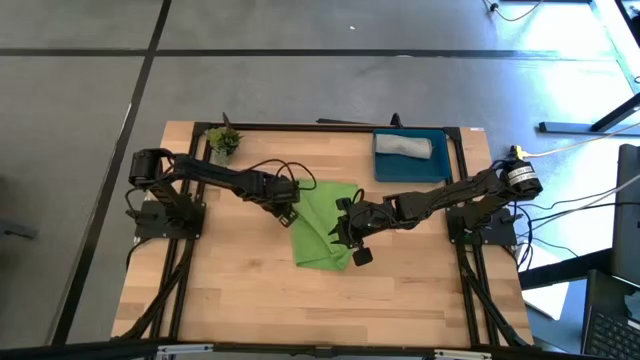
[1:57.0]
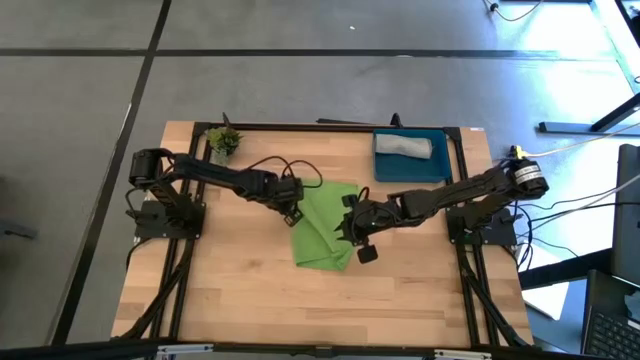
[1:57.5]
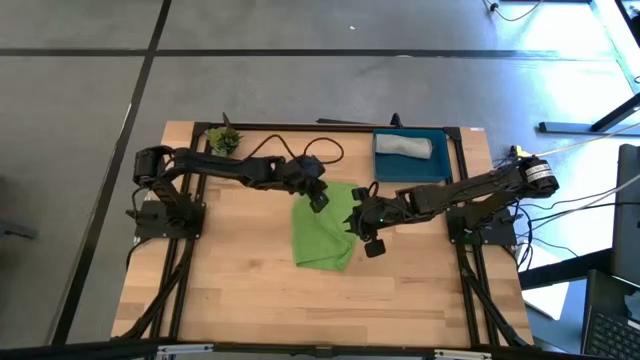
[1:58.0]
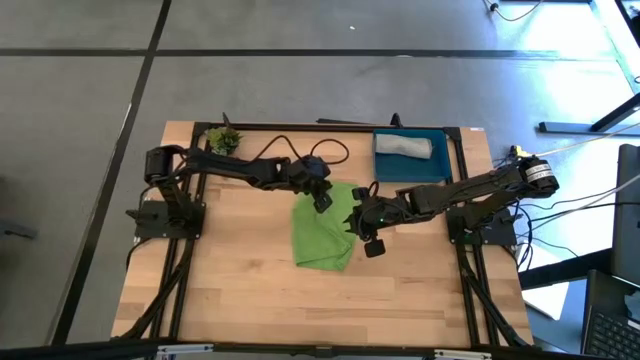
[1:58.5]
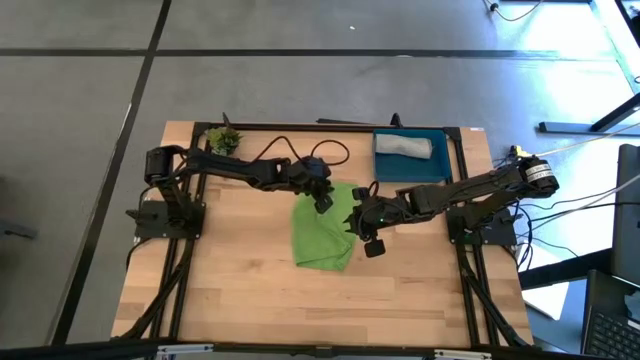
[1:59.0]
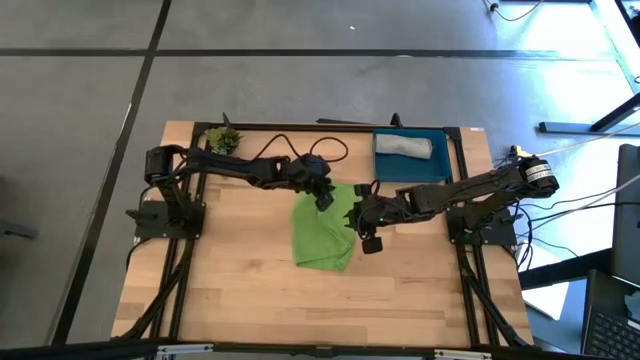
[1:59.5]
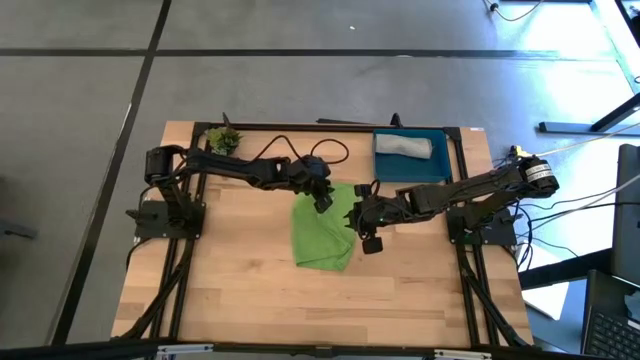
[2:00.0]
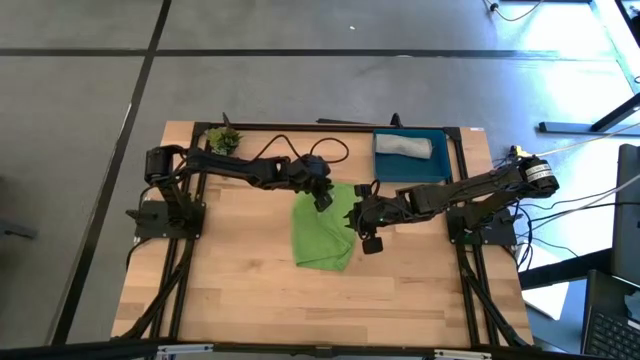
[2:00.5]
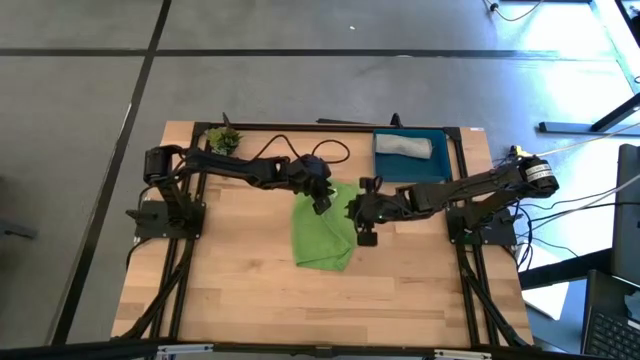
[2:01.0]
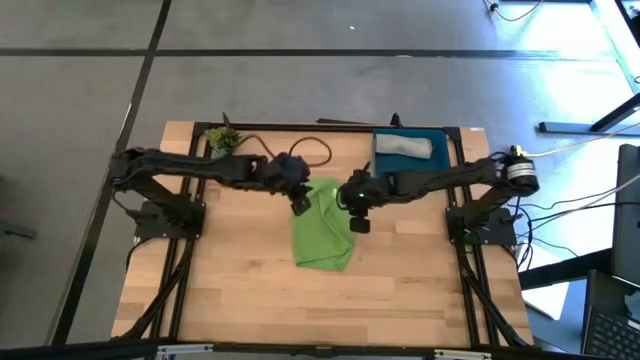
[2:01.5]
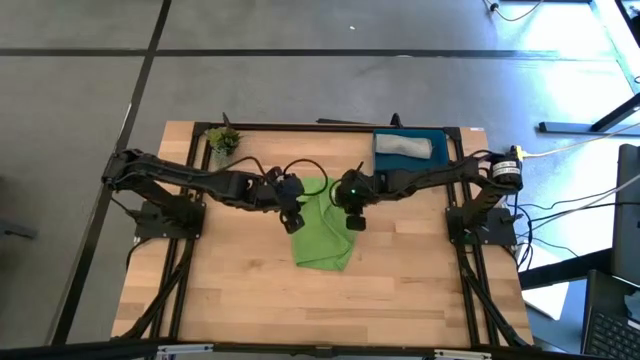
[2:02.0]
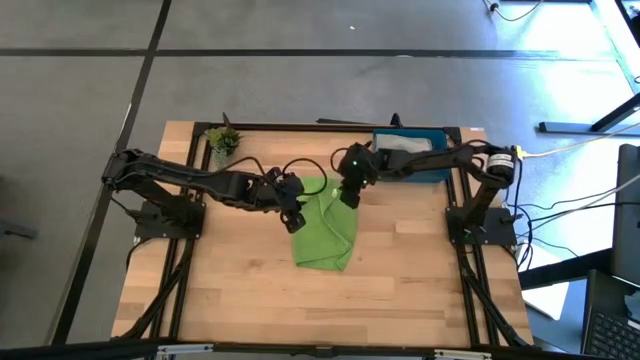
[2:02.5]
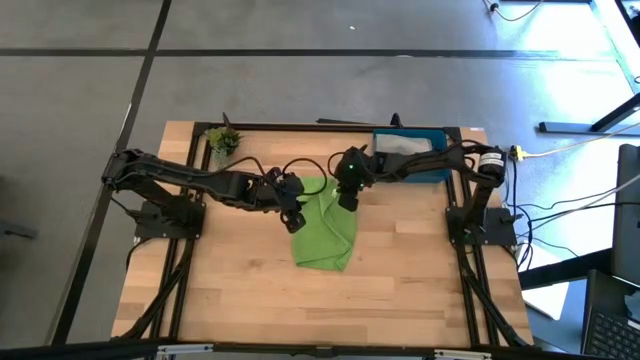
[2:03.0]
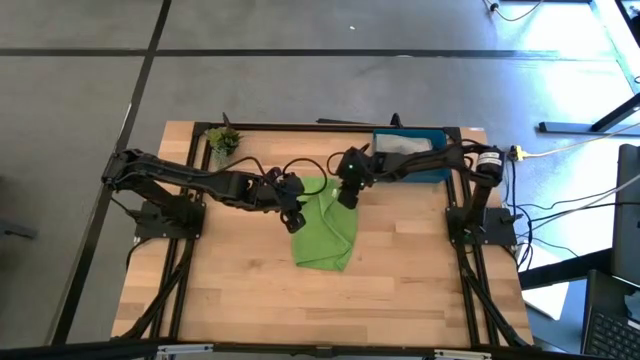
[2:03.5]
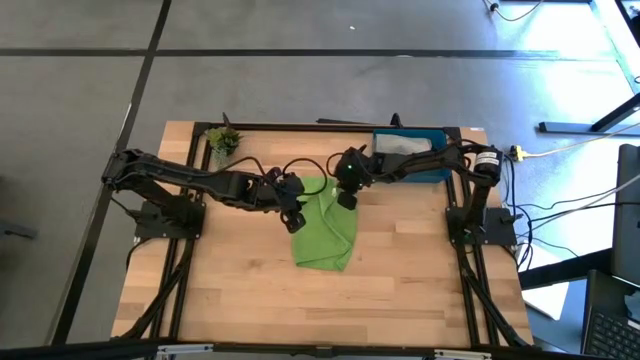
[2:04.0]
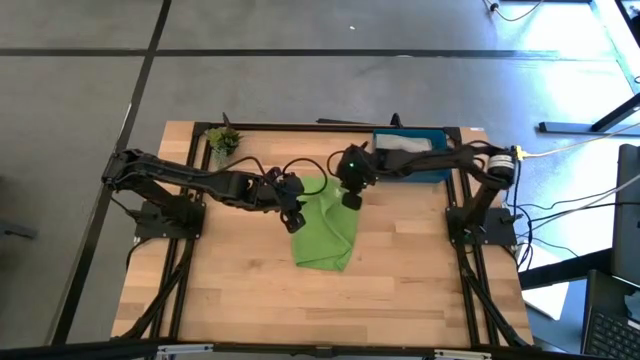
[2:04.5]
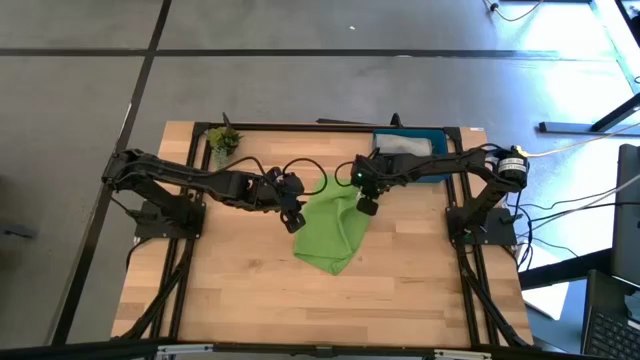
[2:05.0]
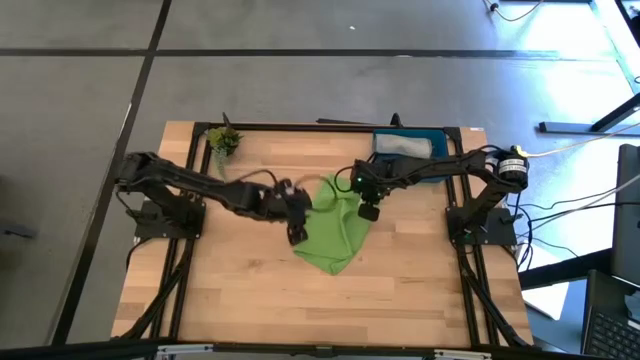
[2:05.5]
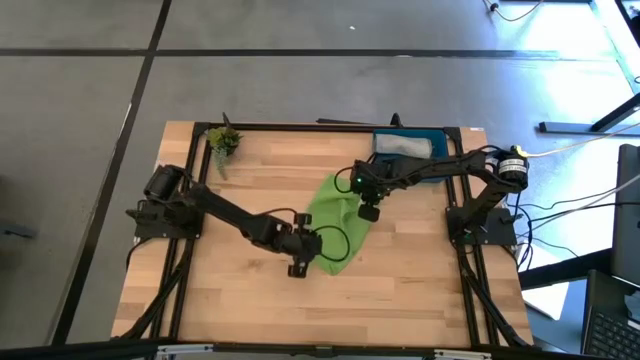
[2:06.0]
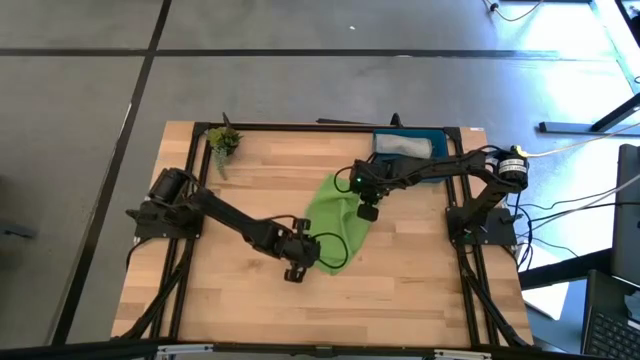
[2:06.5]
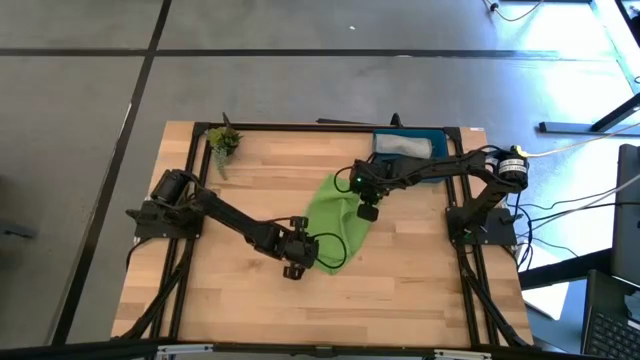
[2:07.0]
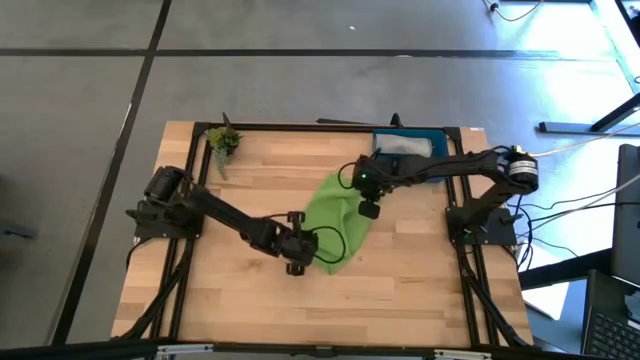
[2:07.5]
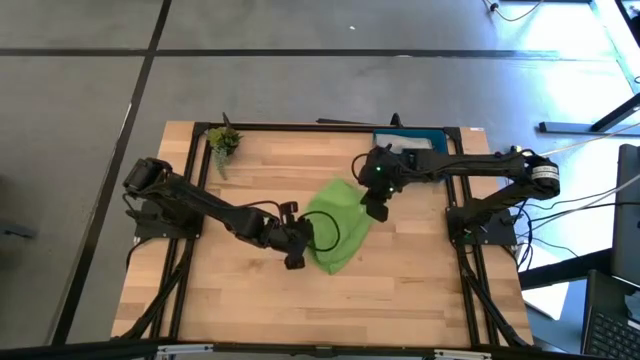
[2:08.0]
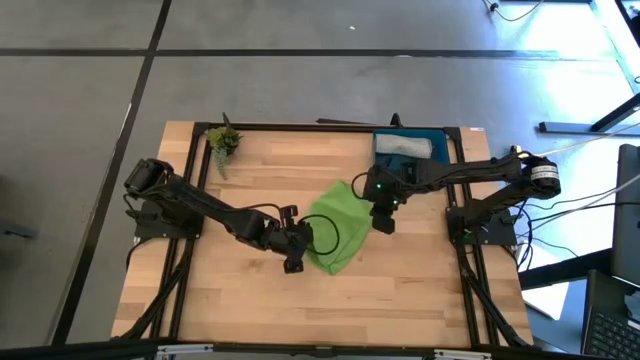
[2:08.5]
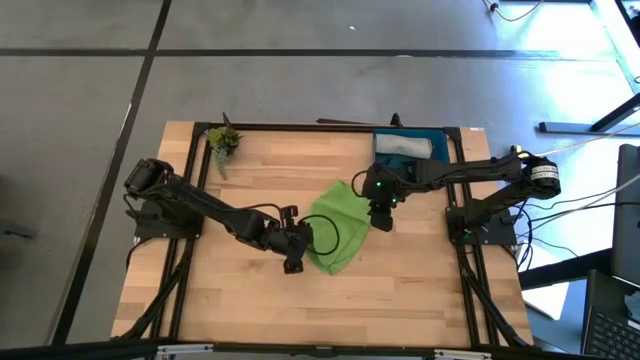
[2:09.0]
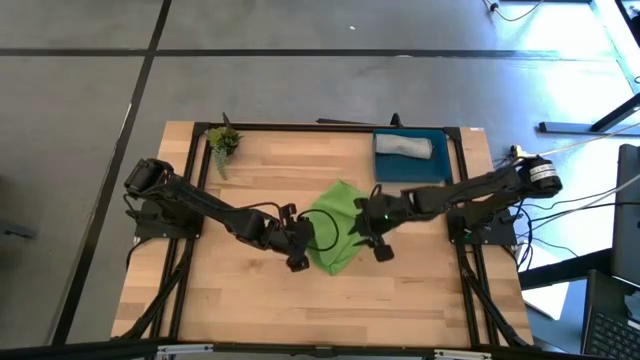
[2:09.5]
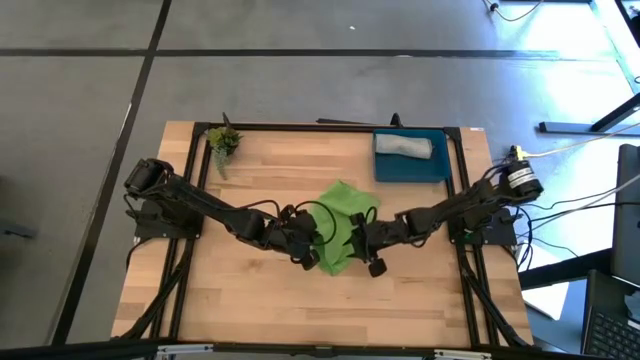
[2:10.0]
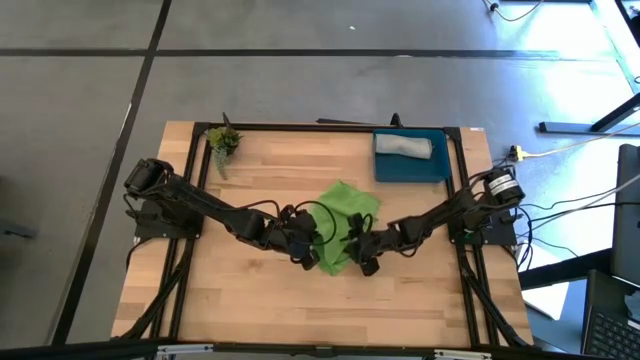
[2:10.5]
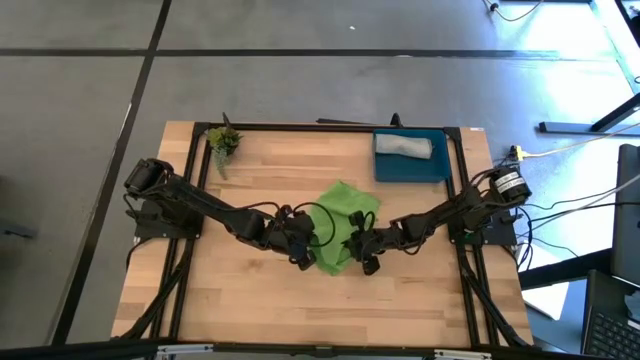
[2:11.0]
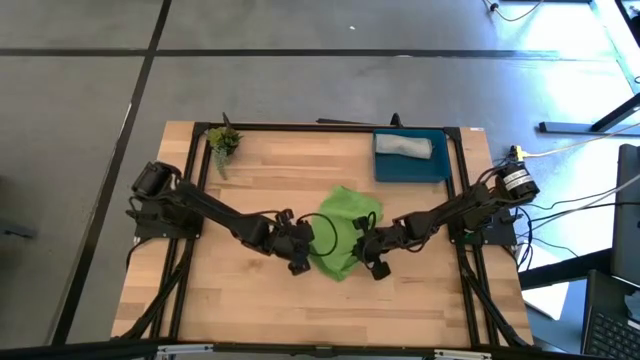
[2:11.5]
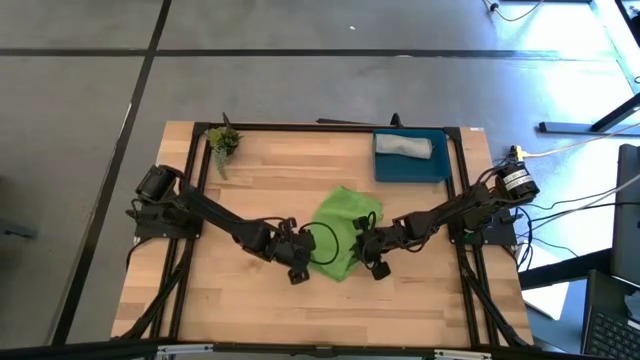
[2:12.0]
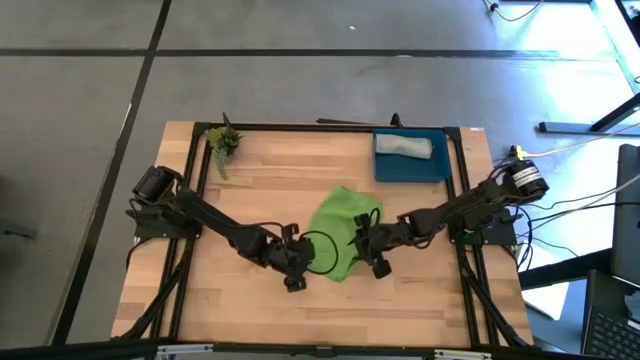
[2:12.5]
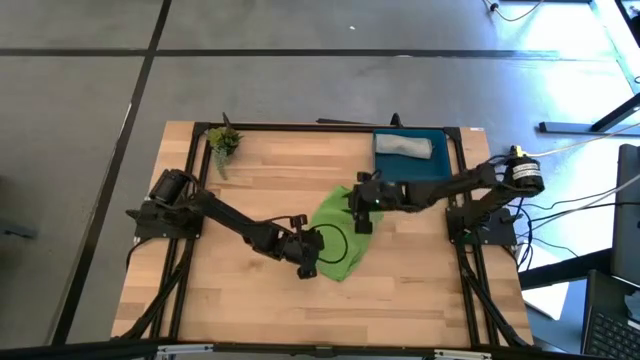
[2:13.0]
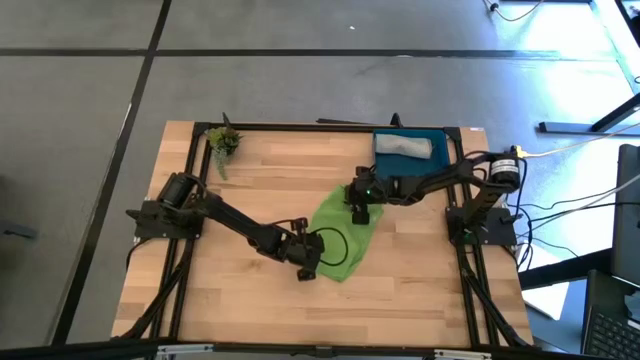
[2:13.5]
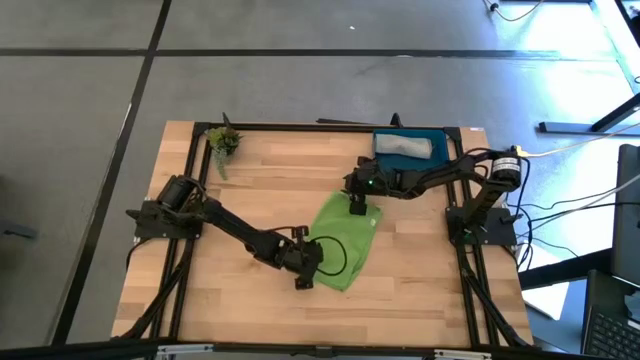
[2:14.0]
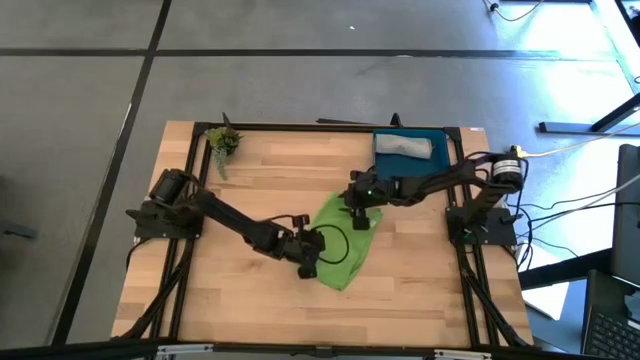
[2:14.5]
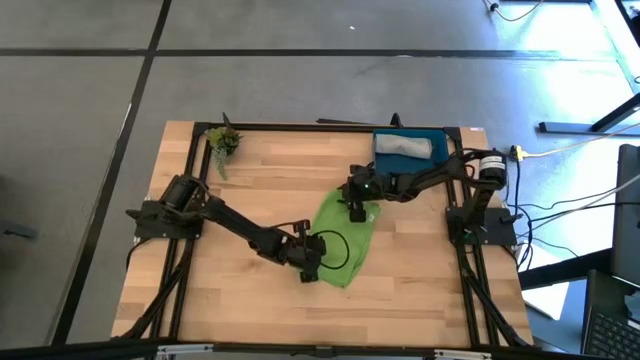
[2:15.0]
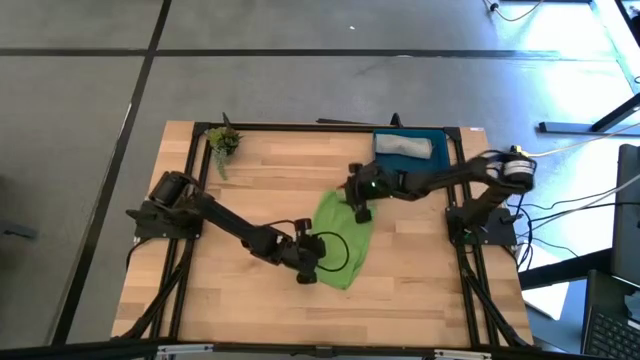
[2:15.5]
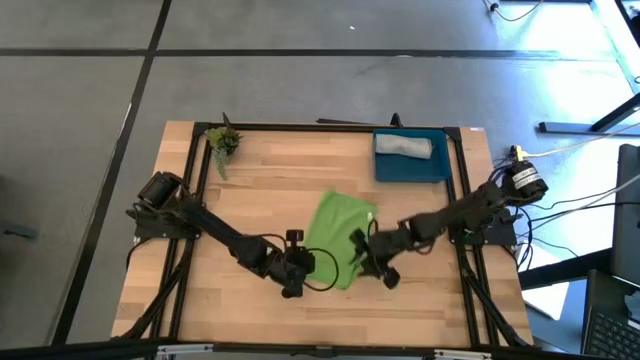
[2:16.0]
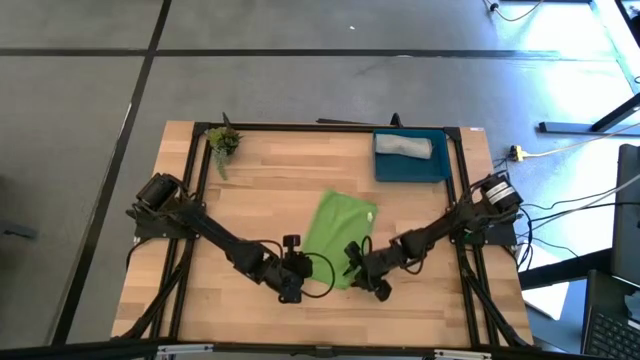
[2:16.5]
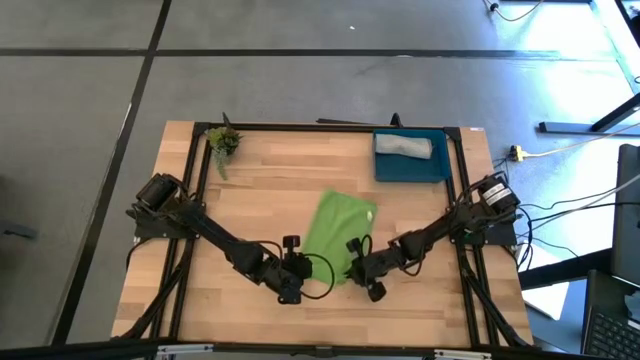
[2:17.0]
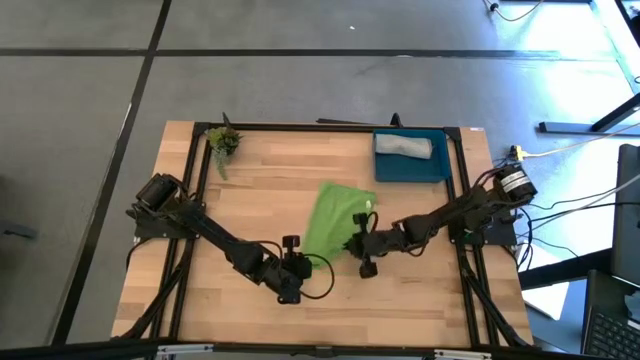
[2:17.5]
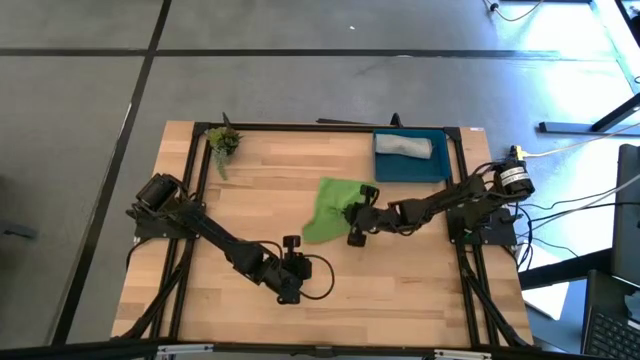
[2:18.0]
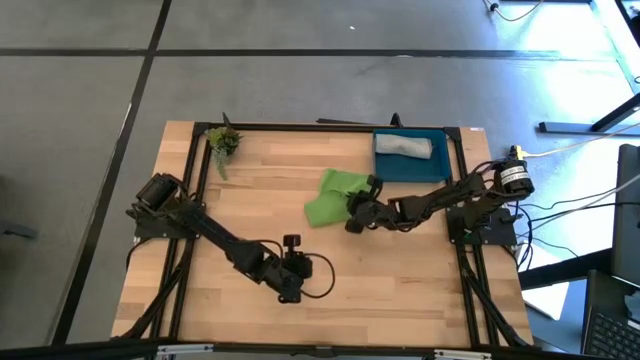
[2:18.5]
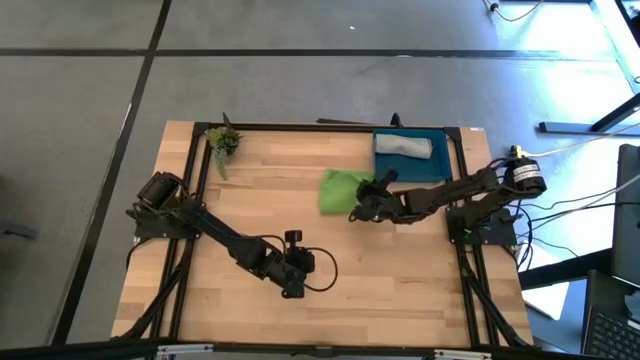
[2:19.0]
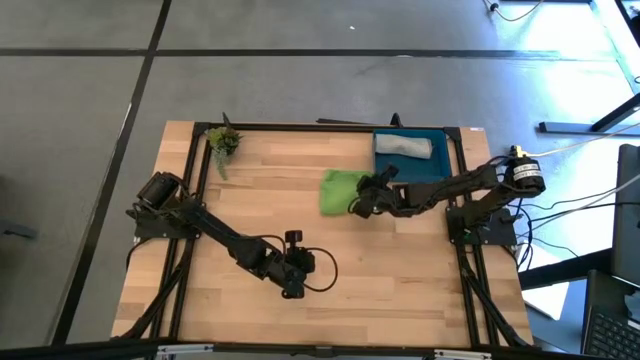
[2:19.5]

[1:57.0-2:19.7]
Task: Roll microfiber towels into tight, uniform cylinder then place into a basket
Fold the green microfiber cloth
